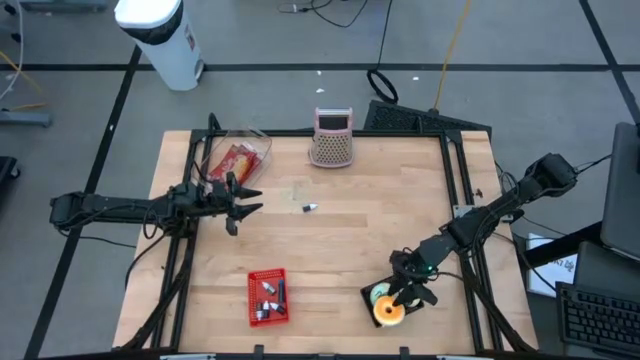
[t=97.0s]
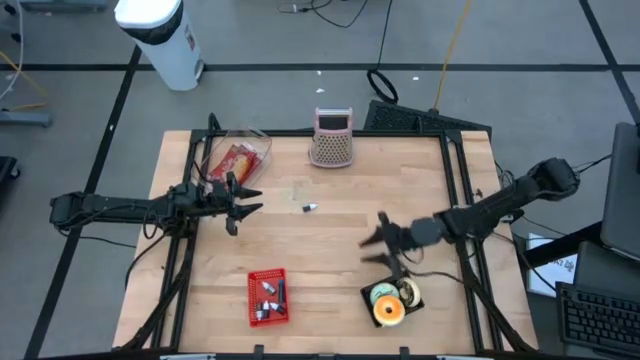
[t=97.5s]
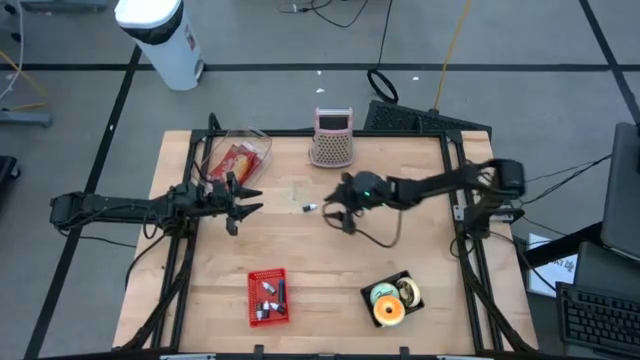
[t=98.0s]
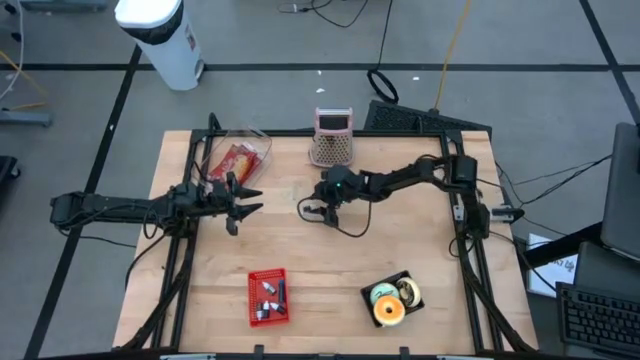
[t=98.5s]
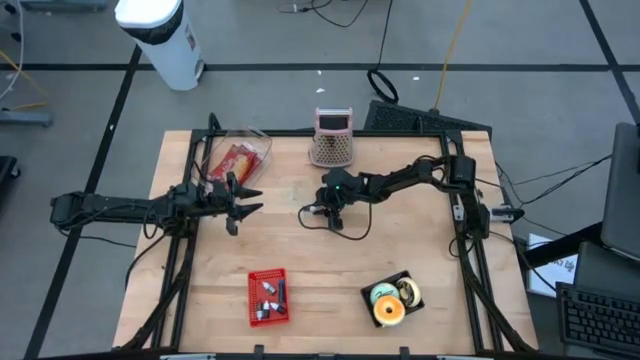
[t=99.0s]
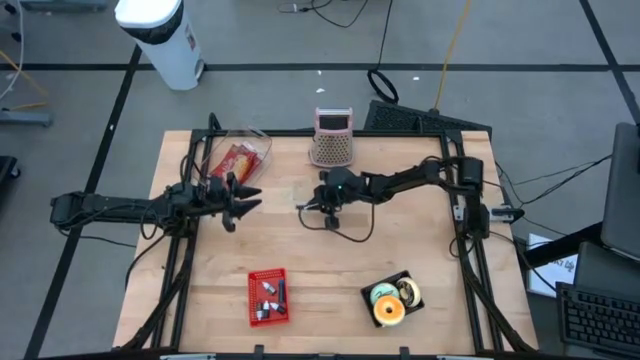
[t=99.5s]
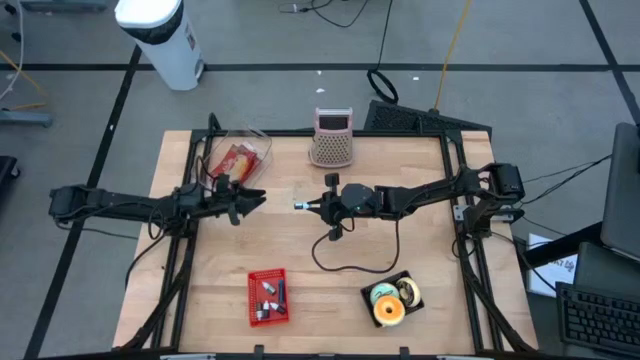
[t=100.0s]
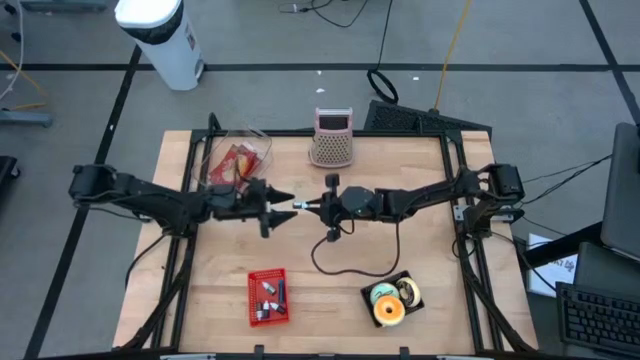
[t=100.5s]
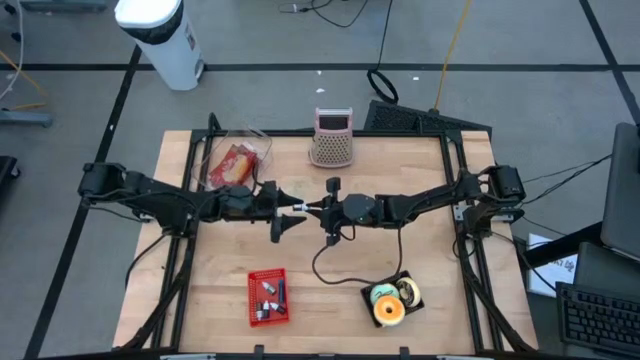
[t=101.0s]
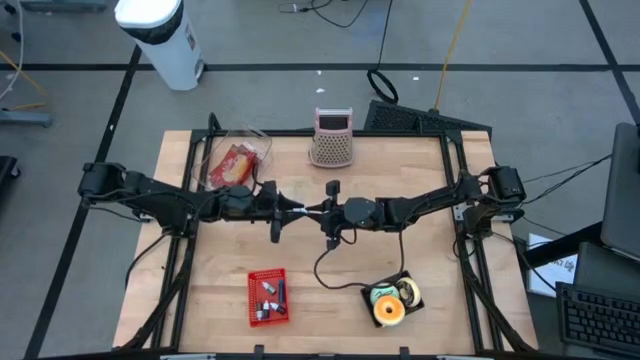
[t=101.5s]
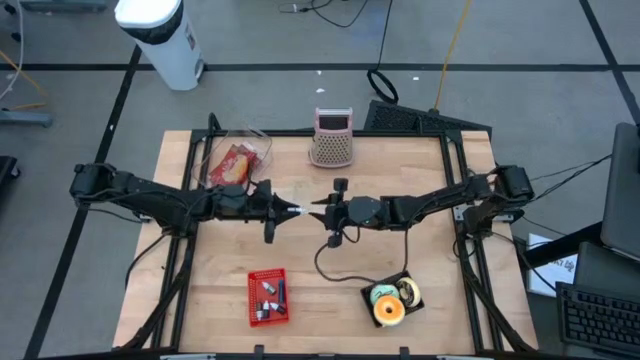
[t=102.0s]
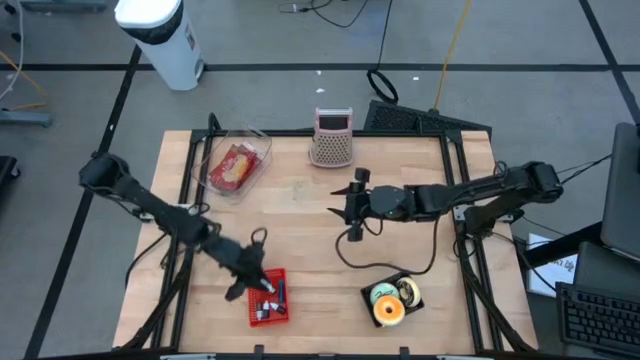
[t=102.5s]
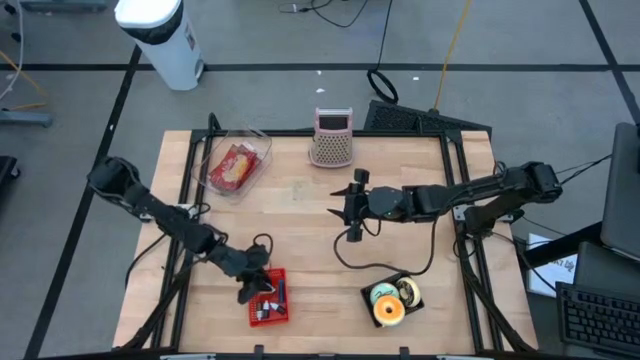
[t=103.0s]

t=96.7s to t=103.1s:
Put the blue food coloring bottle into the red bin

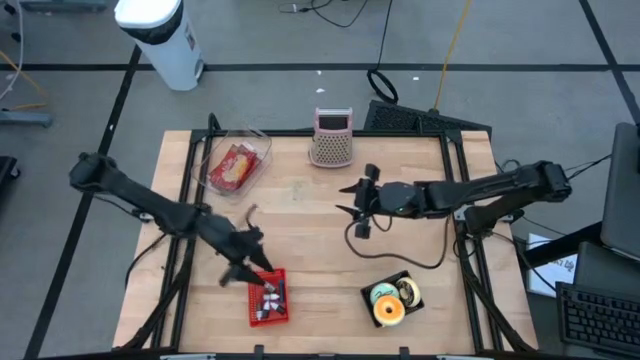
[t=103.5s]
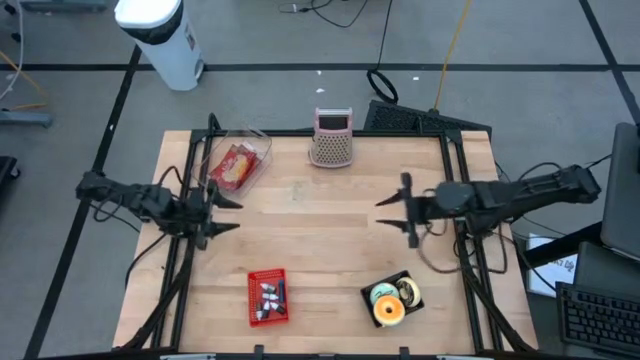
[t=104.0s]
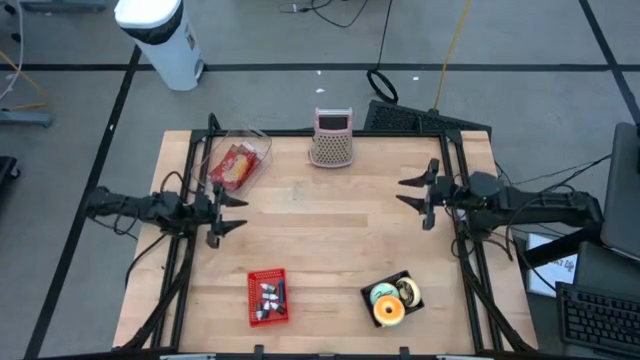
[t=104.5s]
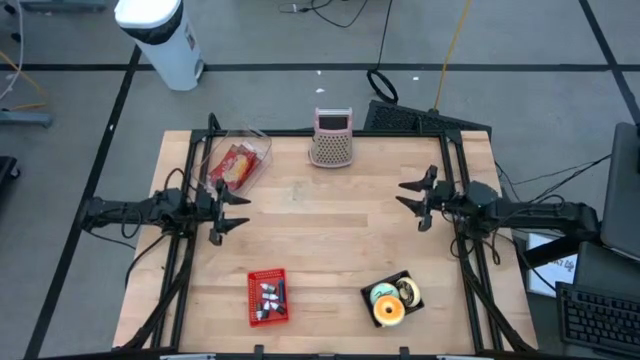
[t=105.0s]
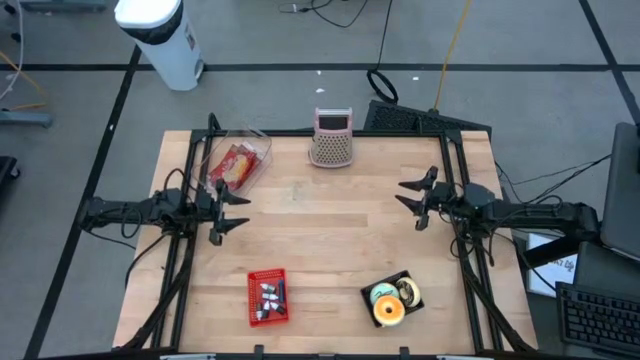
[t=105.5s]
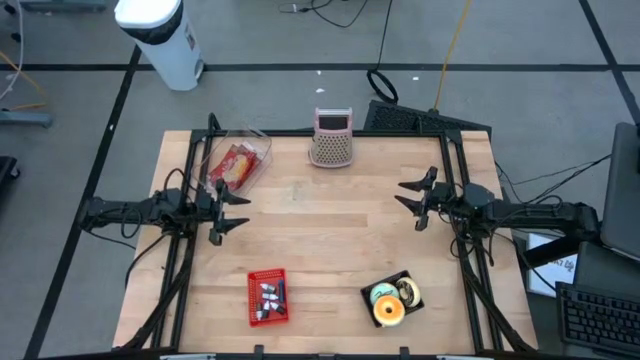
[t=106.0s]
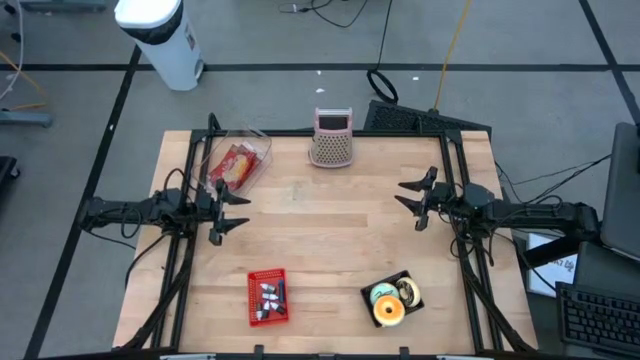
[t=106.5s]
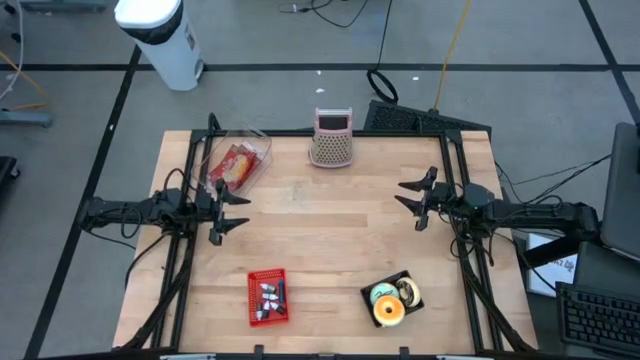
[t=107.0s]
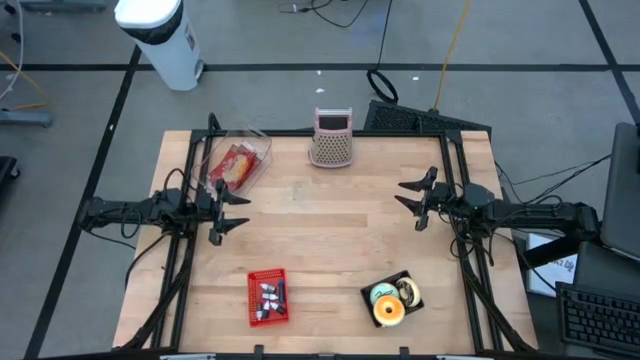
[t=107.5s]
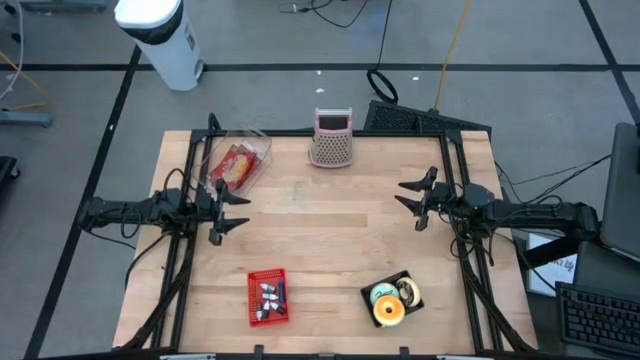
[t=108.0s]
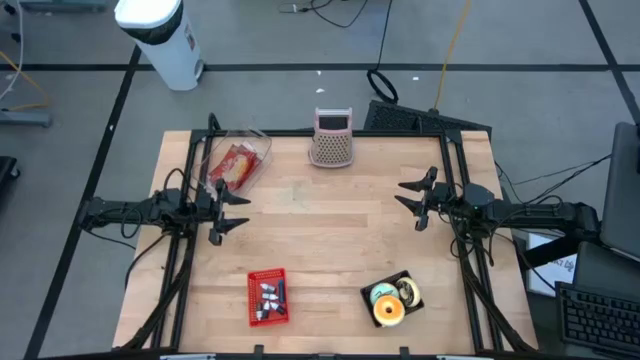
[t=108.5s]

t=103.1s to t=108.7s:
Return to Home Position
